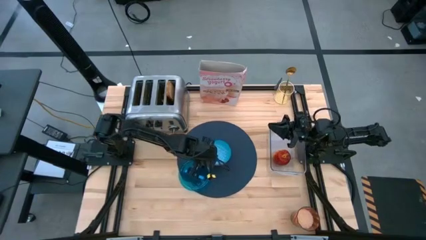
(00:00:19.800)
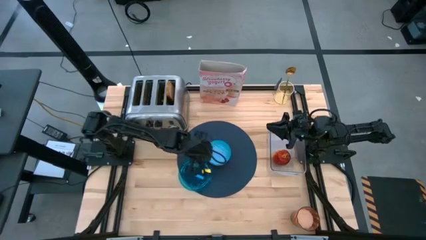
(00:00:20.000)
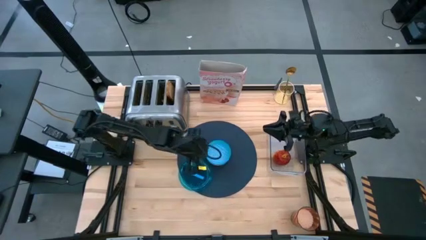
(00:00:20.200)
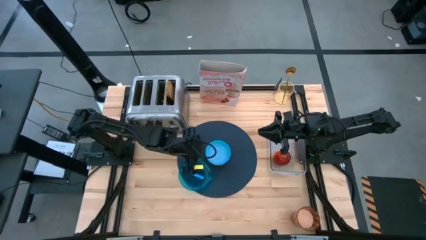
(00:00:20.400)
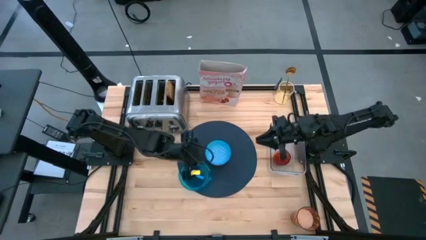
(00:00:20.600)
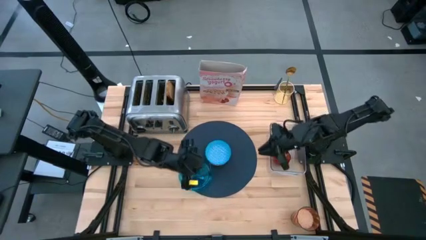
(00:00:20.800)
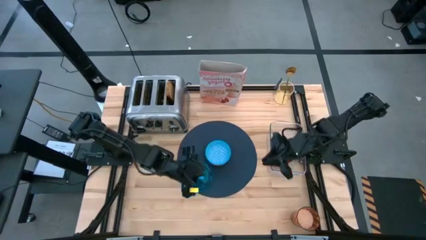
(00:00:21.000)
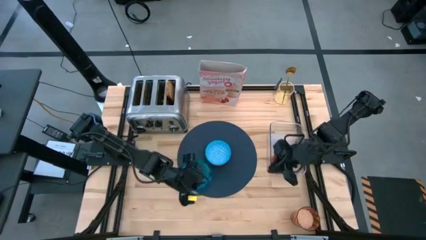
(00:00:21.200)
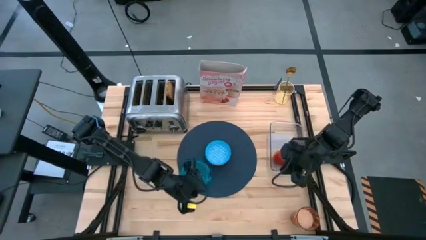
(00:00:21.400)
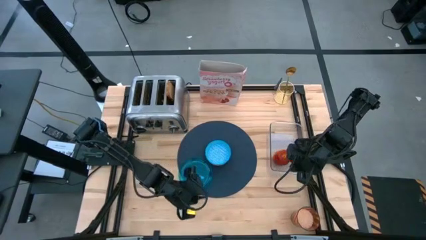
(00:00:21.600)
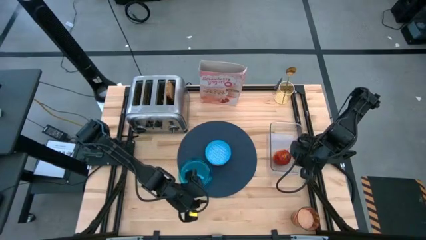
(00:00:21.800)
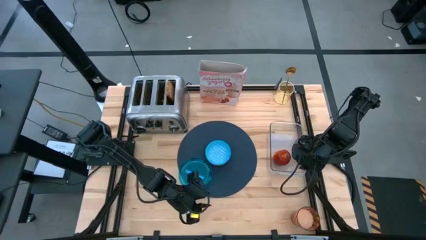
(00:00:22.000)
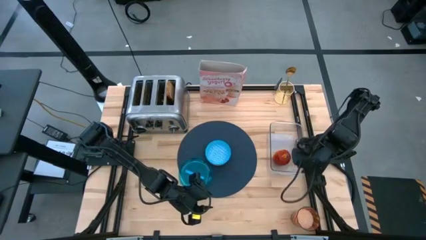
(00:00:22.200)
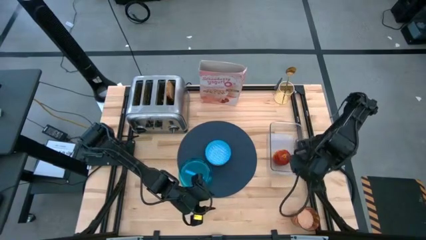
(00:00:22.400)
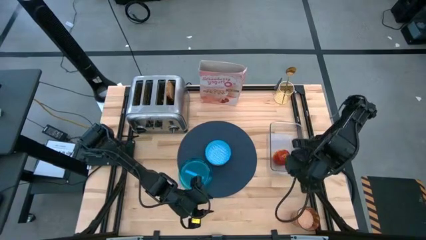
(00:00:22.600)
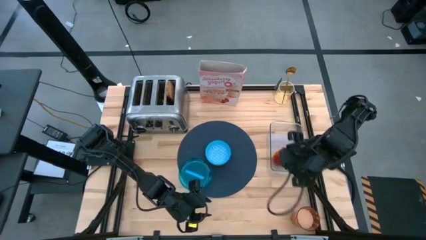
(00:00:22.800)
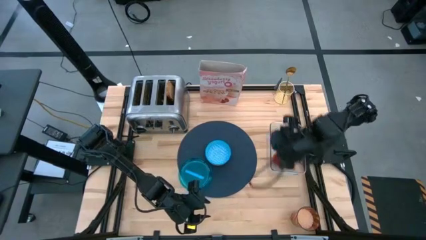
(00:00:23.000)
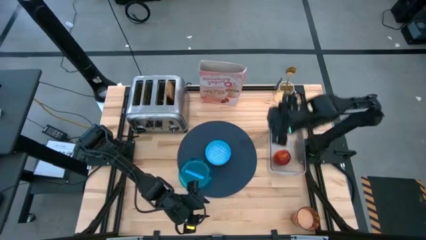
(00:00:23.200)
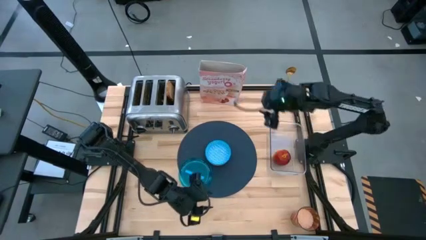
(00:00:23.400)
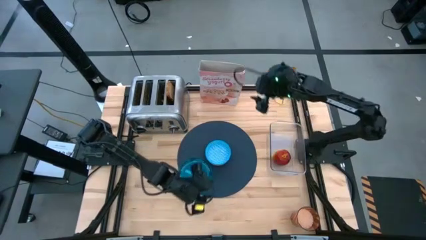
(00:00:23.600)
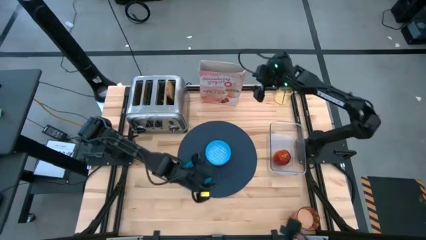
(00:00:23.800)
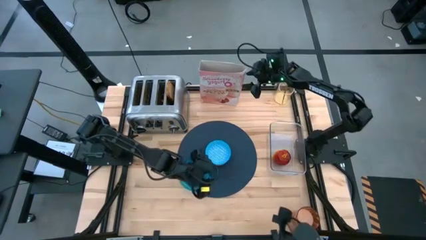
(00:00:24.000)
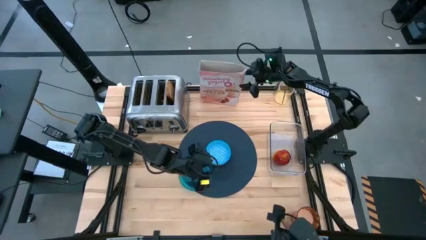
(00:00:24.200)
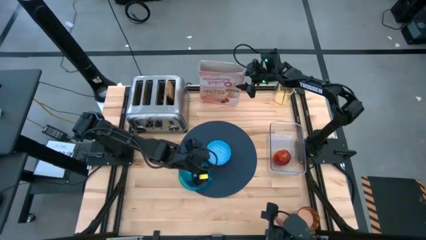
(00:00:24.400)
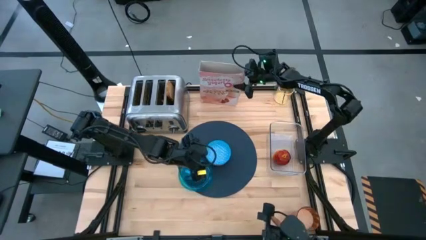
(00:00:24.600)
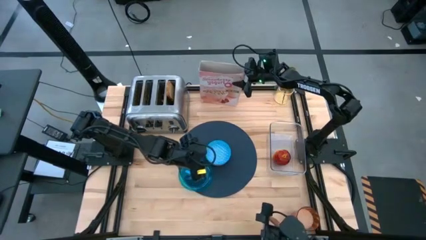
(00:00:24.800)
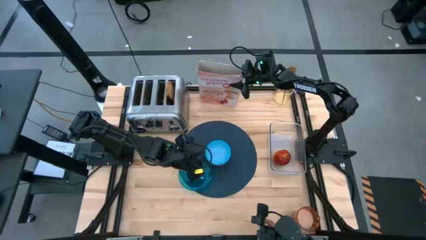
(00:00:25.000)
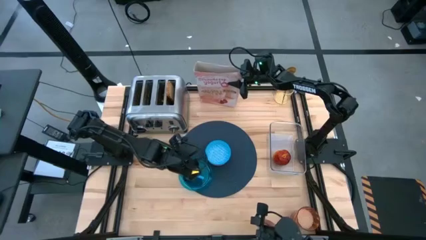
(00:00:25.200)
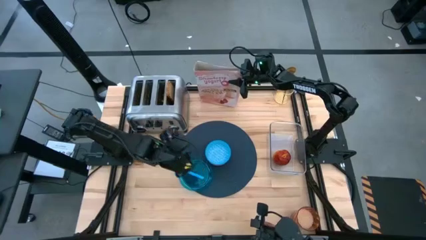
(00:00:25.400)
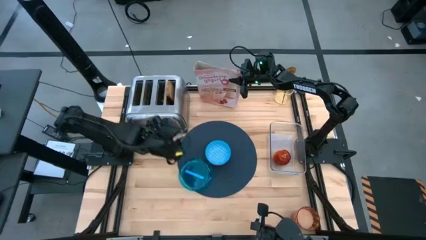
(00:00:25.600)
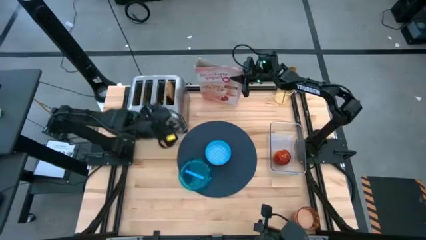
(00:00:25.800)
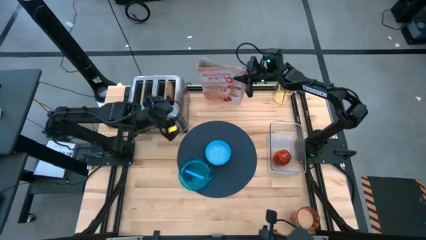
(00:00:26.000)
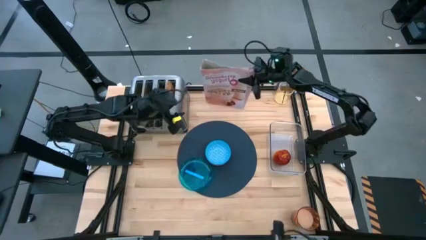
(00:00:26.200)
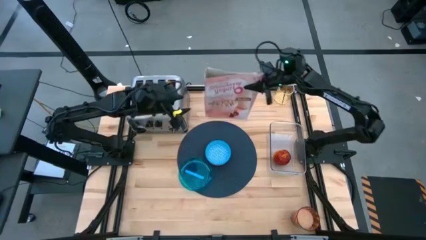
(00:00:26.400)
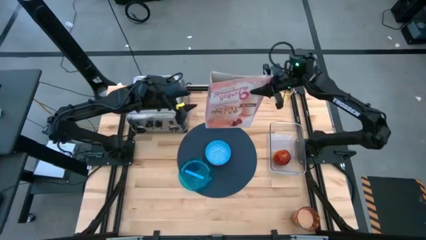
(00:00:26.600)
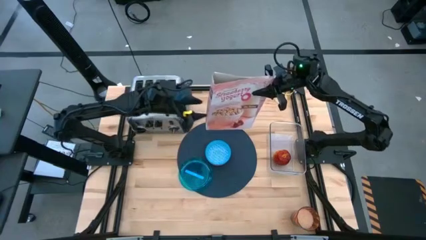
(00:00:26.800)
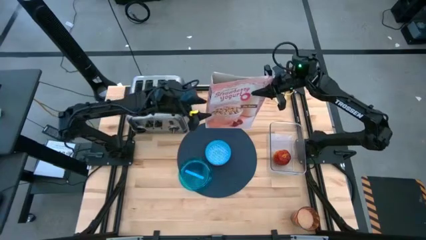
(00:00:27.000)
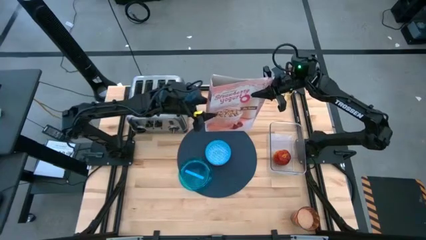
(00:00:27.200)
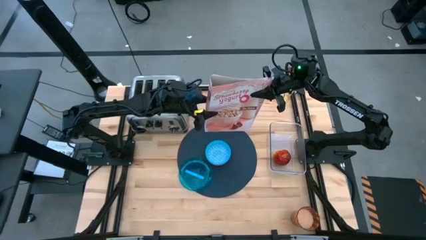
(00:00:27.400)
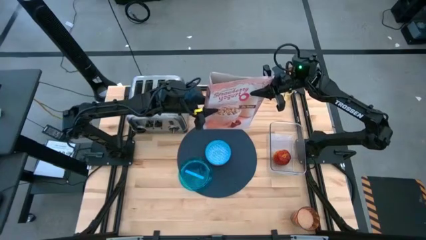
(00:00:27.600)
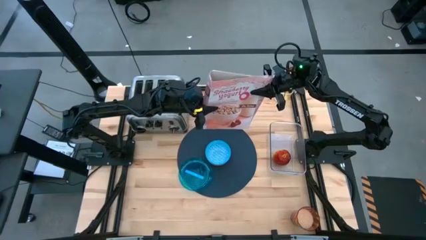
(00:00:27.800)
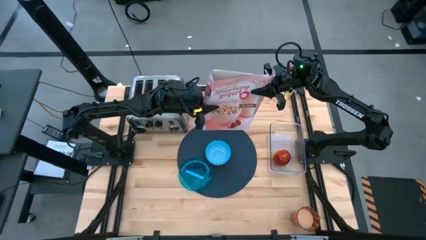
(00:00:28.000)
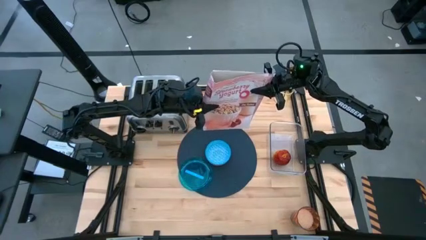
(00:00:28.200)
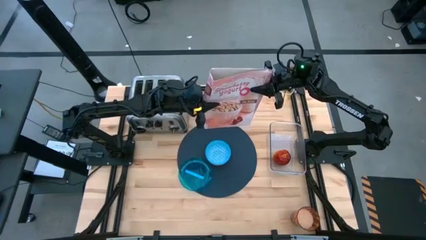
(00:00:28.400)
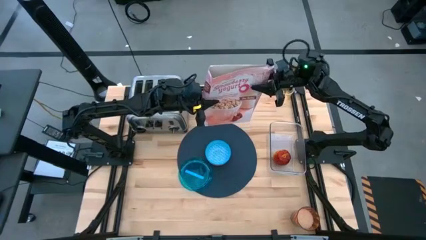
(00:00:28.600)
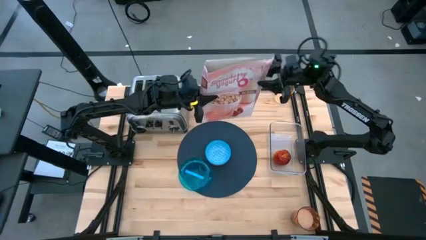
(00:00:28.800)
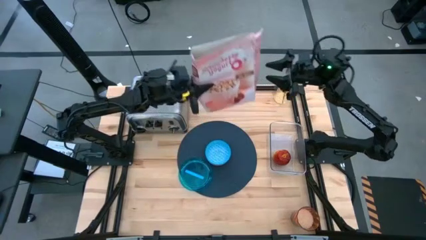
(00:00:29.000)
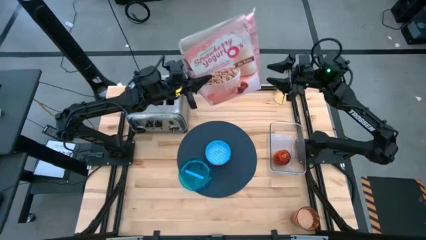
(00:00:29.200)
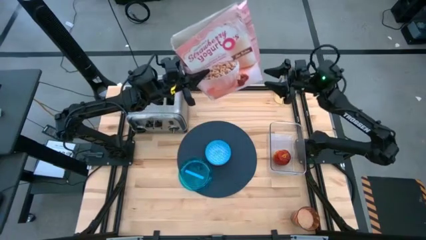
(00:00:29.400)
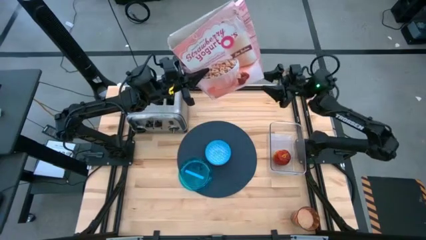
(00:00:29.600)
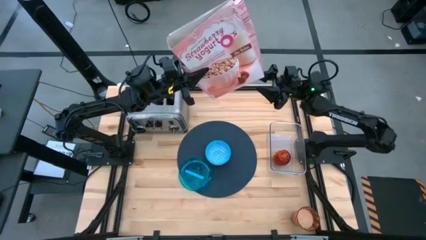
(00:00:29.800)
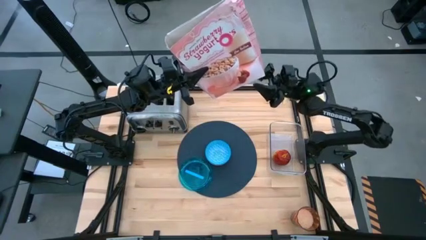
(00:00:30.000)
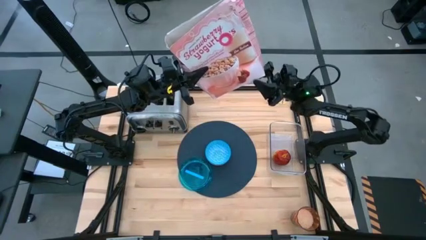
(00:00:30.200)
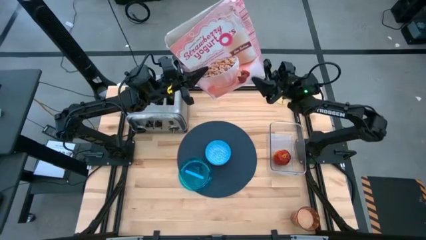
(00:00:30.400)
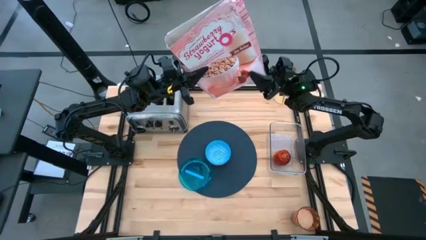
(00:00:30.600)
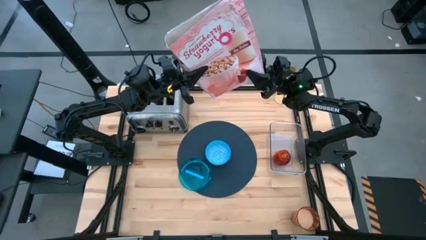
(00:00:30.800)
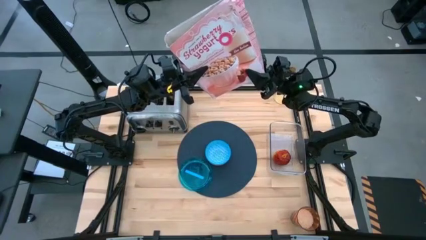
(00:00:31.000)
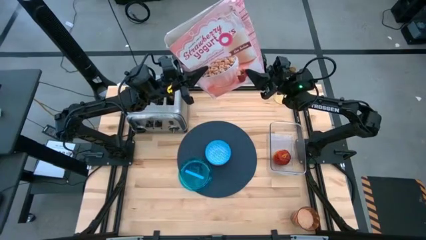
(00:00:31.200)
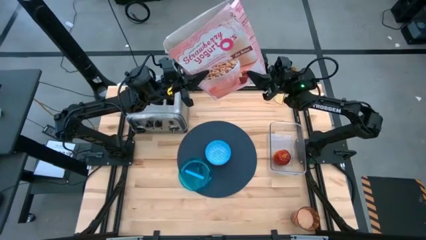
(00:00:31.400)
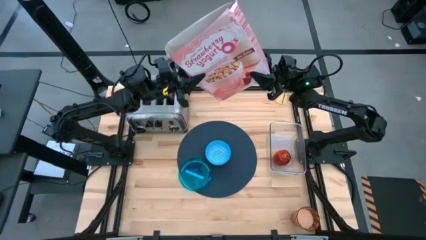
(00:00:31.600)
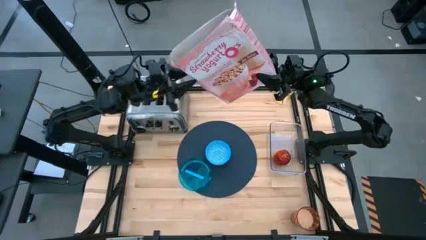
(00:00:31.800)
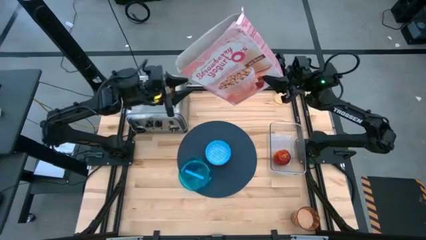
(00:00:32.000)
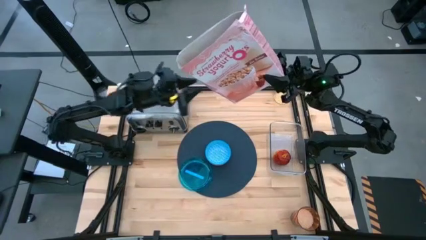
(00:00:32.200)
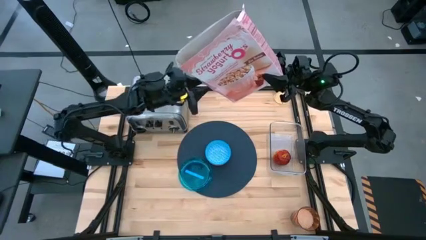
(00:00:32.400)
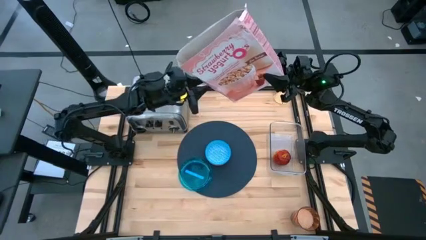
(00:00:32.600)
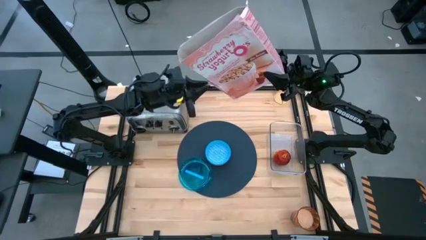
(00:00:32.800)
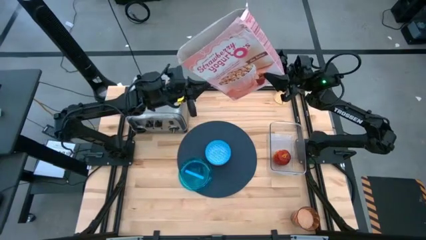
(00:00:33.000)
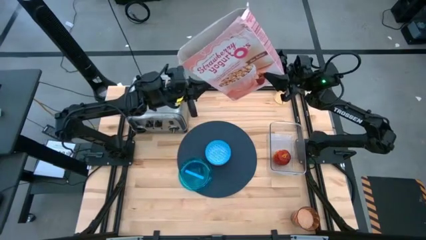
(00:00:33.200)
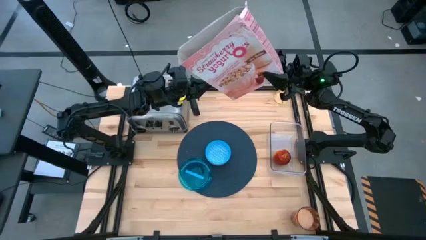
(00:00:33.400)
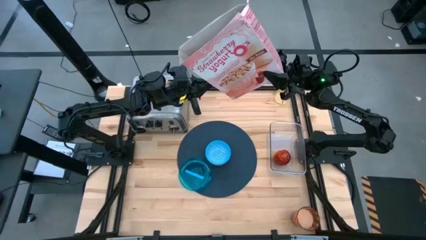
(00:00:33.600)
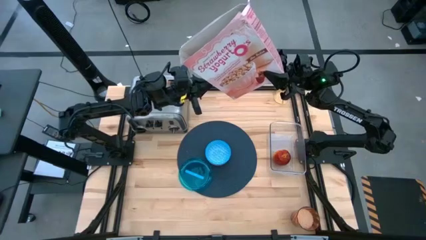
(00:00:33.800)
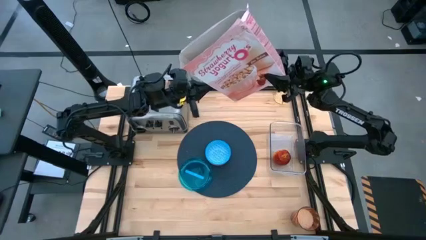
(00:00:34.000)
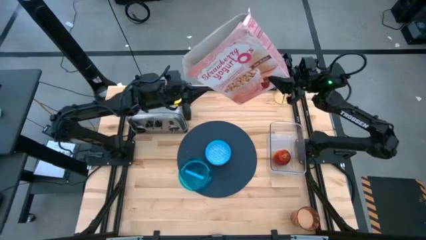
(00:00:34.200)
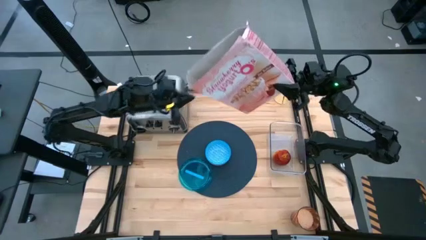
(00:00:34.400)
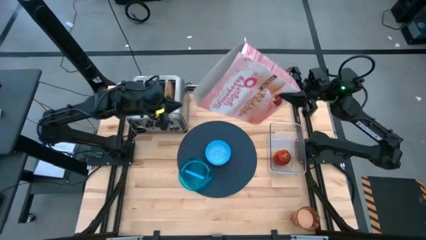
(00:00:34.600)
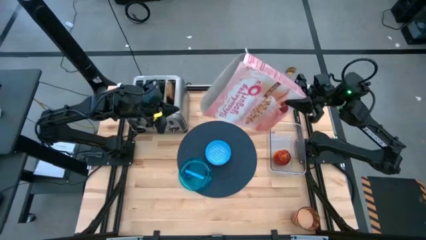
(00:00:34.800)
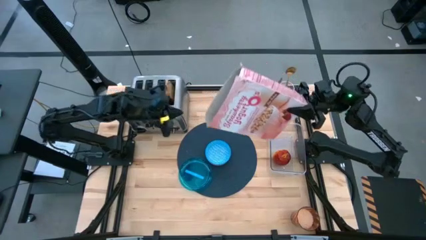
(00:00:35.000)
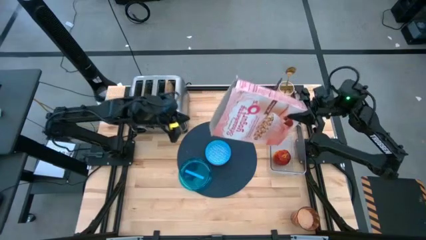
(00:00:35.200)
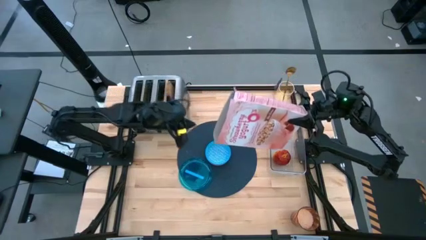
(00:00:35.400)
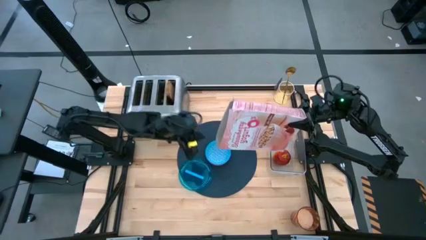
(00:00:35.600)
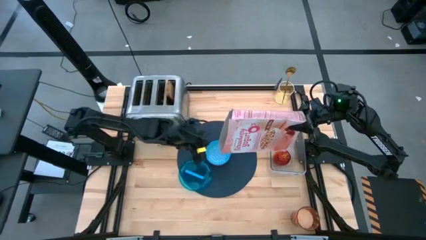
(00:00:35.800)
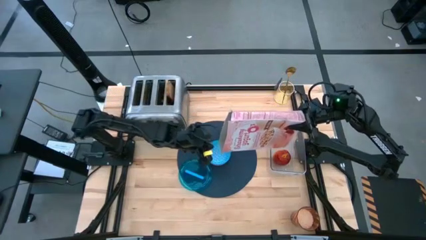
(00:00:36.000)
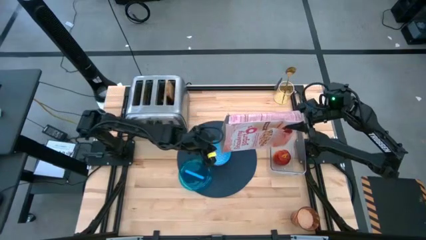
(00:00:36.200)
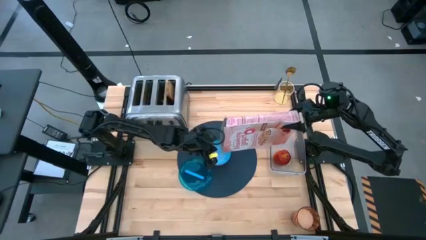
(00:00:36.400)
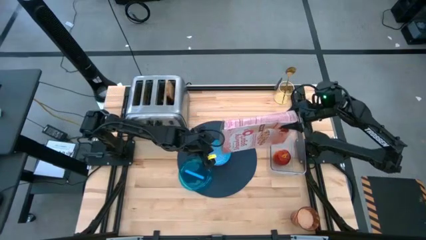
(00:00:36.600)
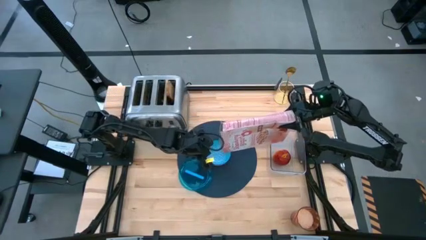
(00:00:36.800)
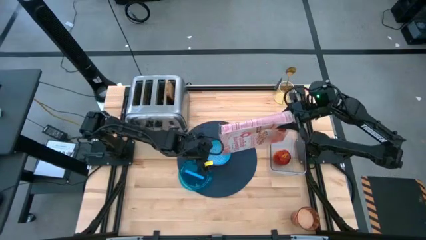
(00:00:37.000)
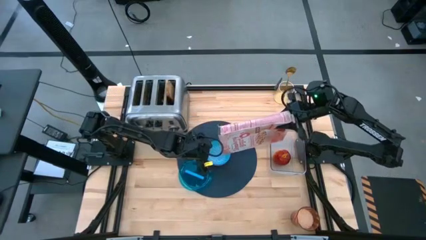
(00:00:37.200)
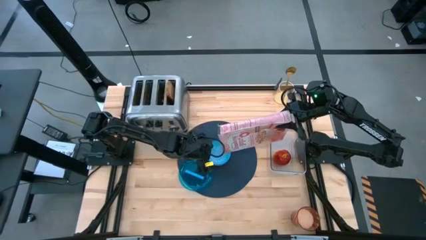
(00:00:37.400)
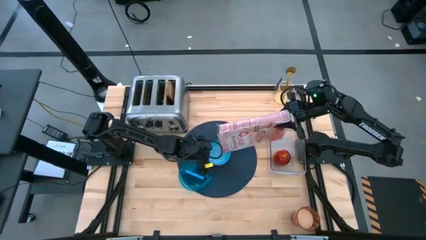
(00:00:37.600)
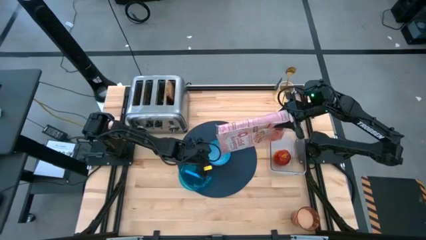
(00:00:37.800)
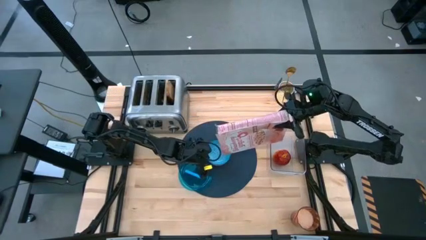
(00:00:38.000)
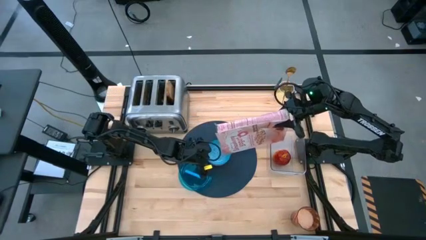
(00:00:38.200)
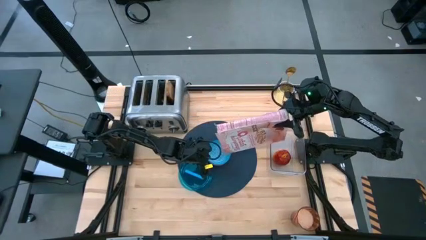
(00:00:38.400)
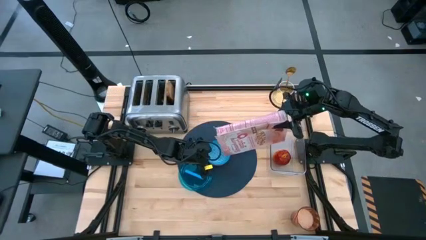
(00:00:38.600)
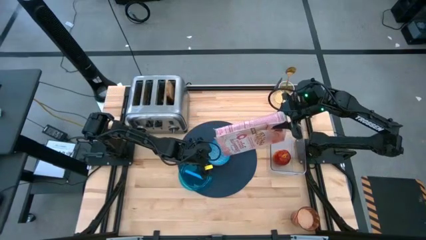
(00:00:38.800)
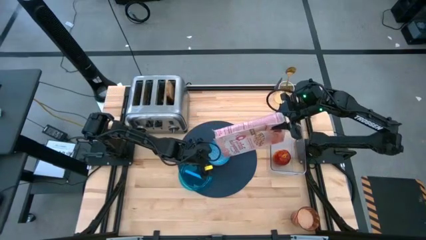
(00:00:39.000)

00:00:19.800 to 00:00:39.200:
Task: Arrange a breakfast setting
Pour the cereals from the pink cereal box into the blue bowl
